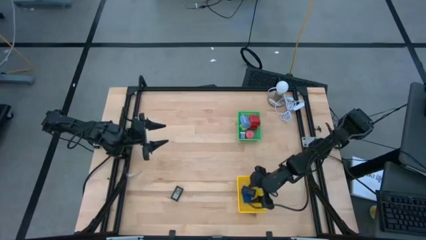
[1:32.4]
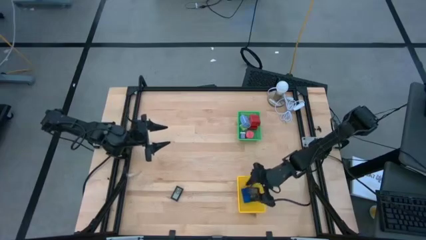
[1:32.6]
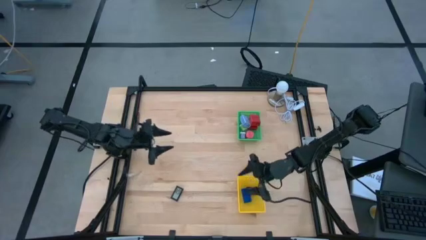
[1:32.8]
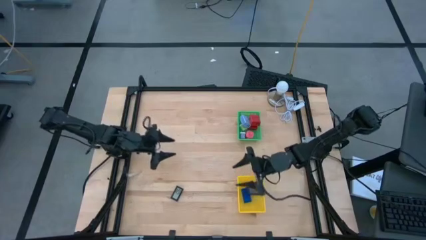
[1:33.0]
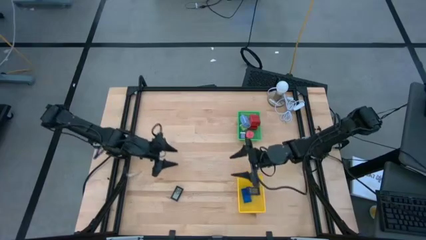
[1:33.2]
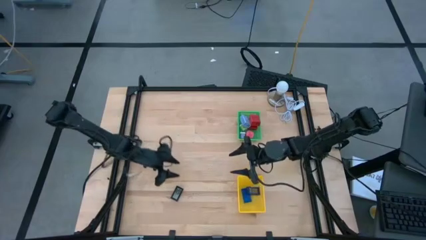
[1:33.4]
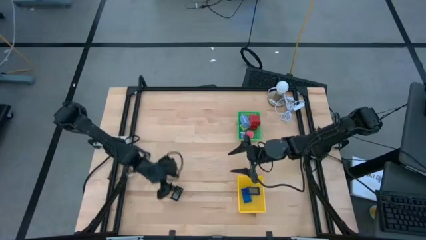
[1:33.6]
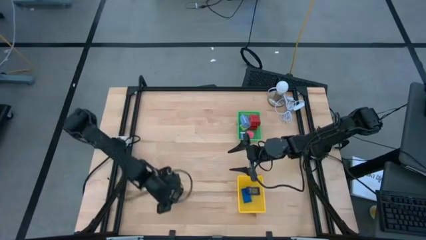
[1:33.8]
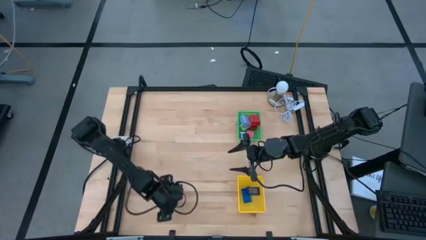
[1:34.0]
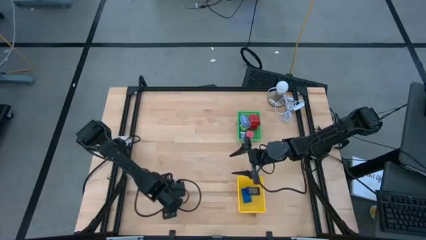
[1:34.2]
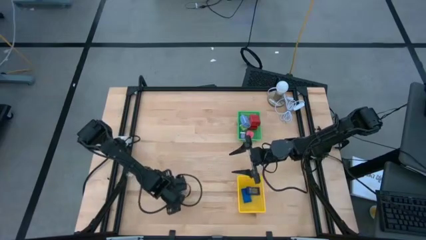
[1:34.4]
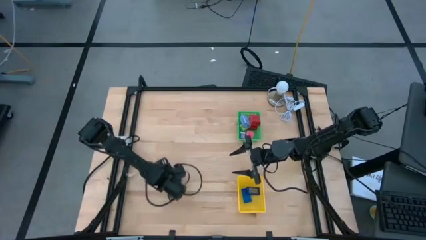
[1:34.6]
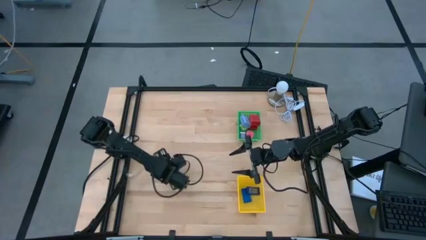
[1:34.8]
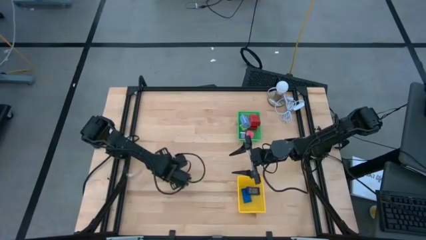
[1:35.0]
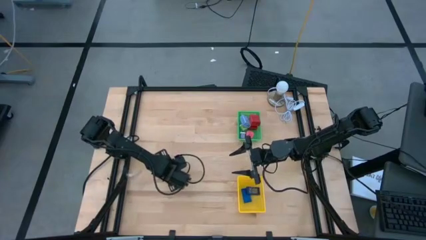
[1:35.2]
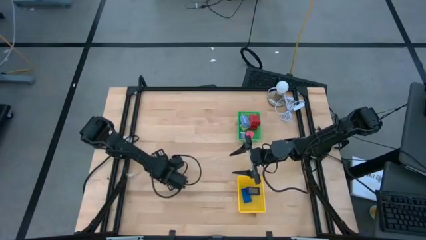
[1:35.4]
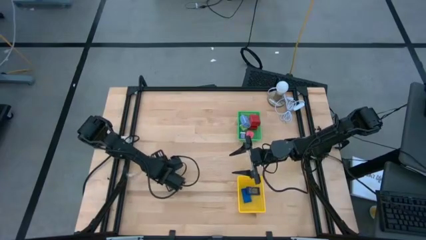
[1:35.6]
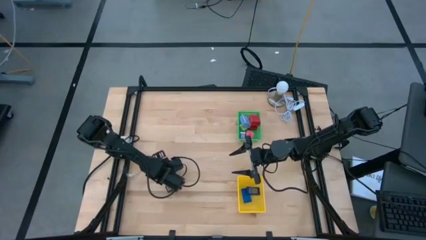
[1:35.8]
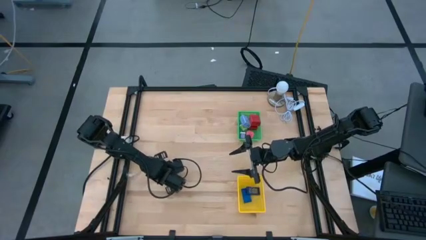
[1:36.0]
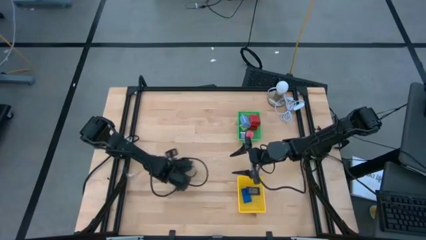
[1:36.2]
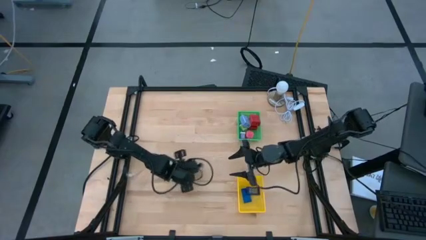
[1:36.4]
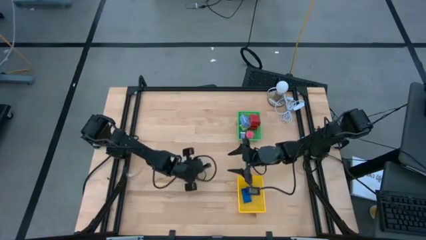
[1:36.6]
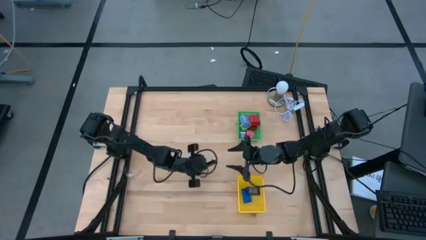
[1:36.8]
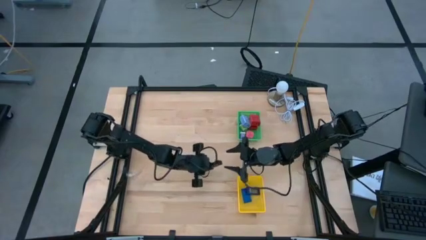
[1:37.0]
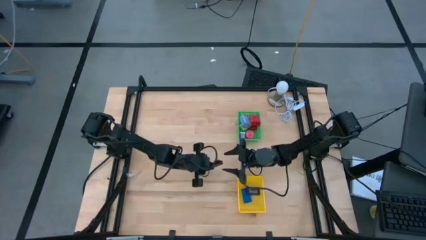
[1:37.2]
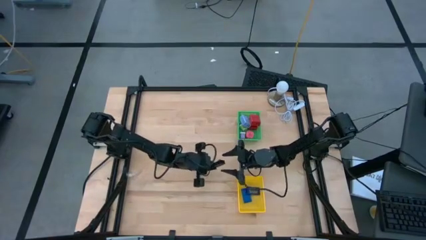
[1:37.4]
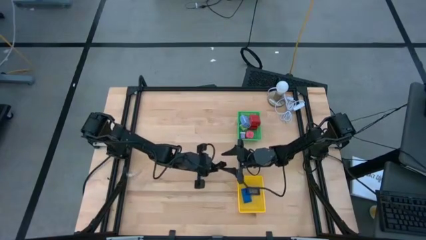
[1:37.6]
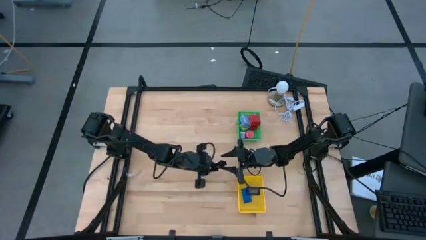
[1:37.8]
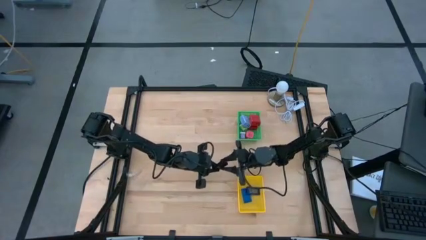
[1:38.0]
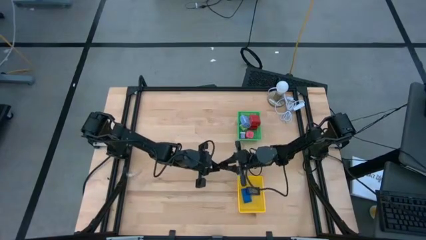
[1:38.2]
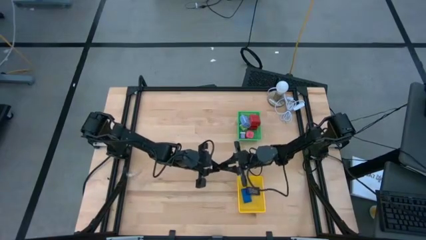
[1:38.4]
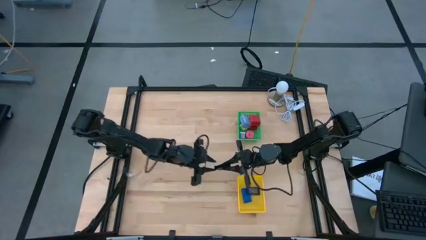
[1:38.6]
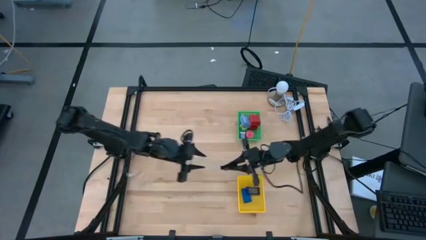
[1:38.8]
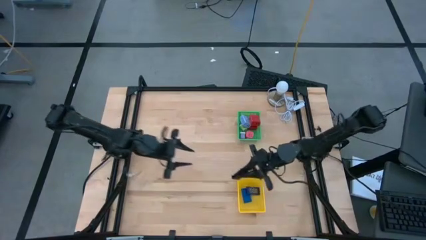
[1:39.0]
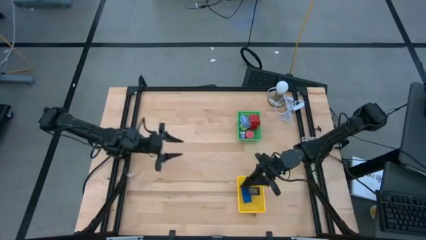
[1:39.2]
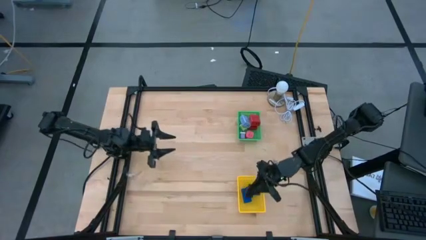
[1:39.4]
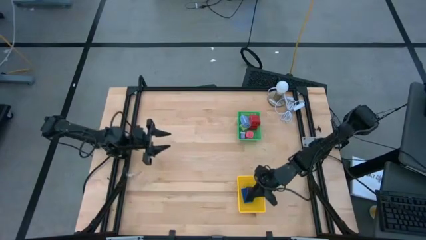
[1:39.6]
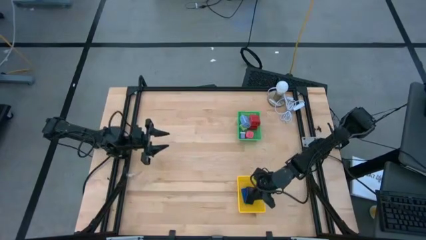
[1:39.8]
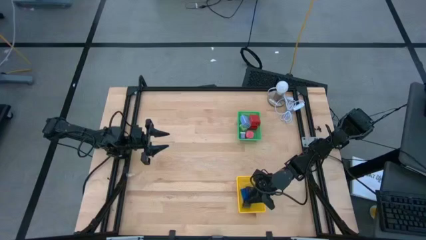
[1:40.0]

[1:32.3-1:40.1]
Task: Pick & Place Office items
Put the black digital timer into the yellow bin

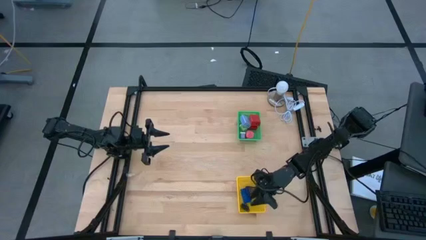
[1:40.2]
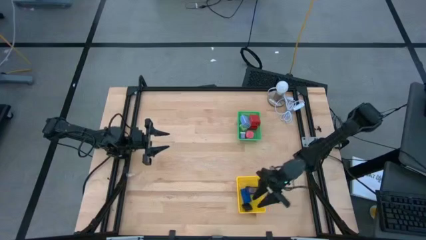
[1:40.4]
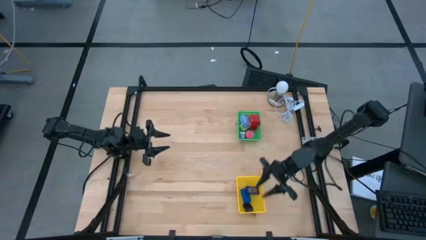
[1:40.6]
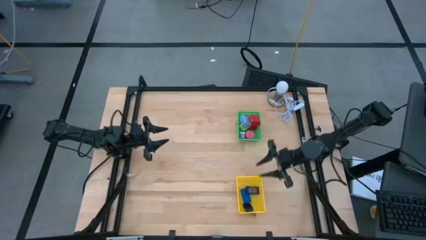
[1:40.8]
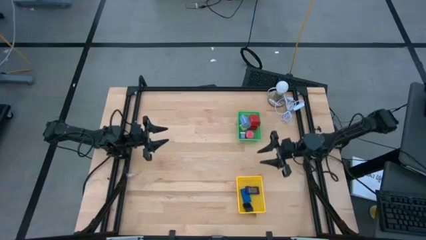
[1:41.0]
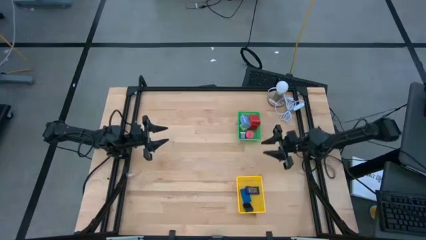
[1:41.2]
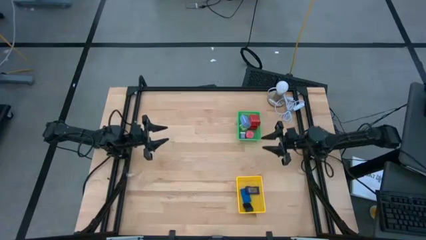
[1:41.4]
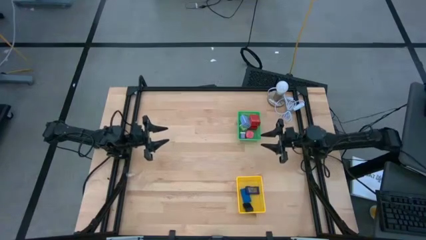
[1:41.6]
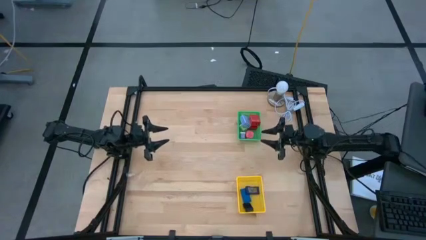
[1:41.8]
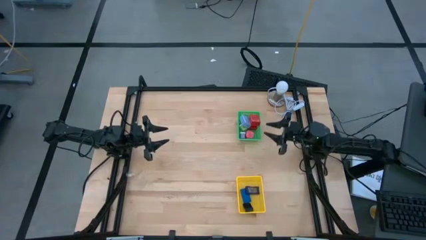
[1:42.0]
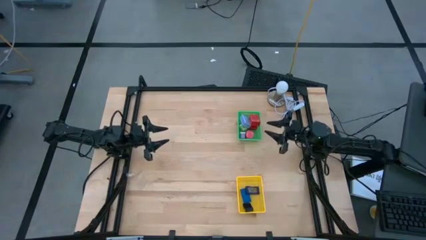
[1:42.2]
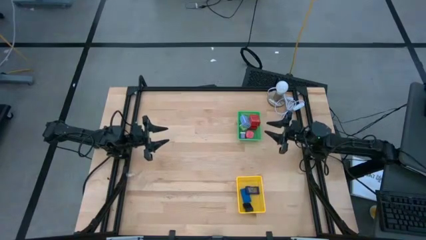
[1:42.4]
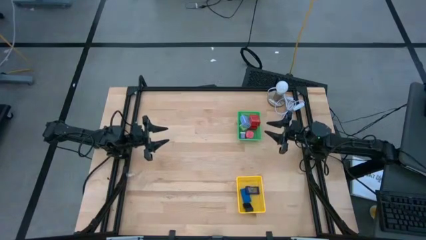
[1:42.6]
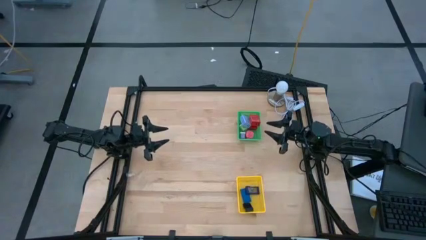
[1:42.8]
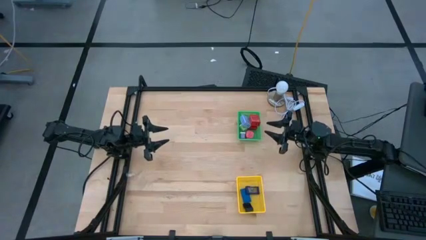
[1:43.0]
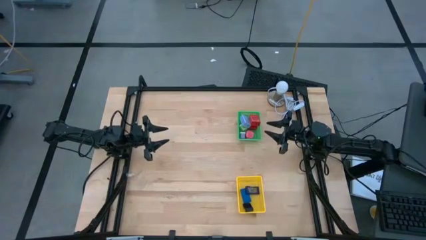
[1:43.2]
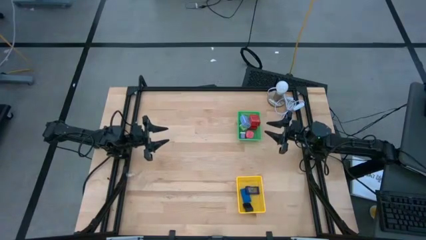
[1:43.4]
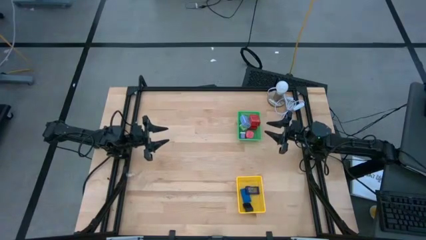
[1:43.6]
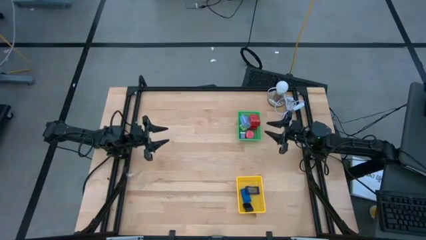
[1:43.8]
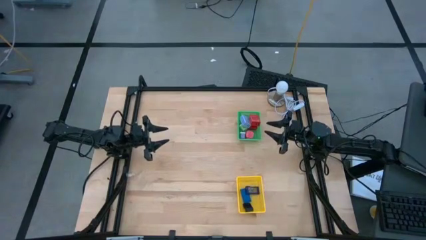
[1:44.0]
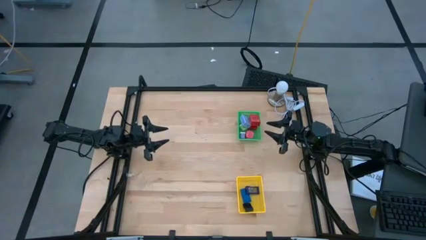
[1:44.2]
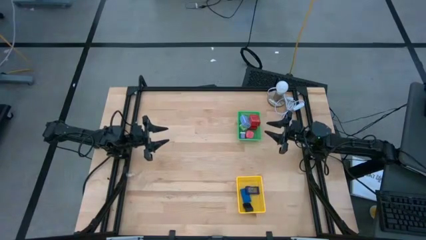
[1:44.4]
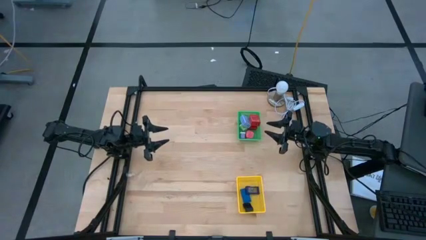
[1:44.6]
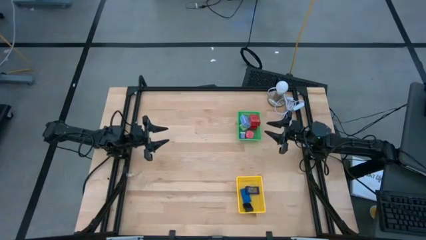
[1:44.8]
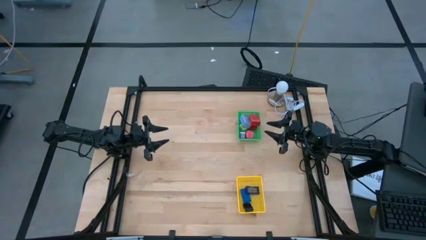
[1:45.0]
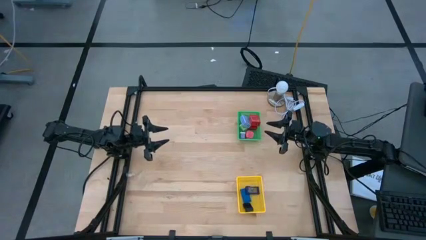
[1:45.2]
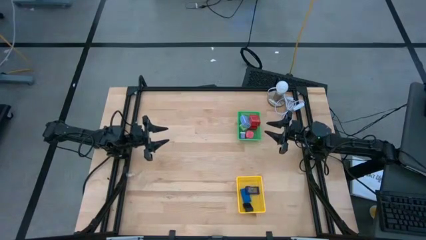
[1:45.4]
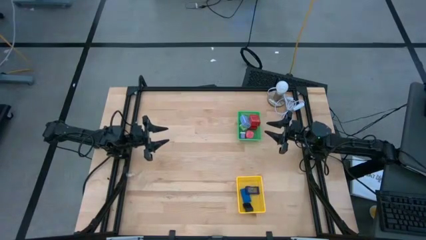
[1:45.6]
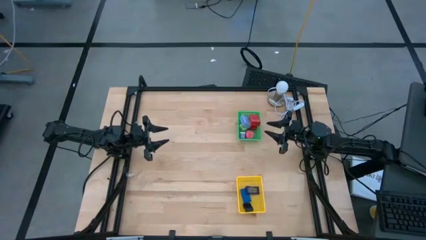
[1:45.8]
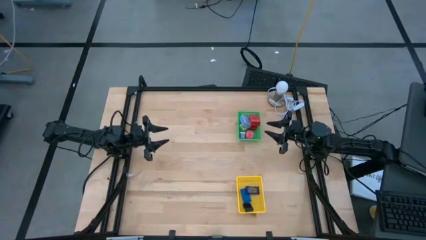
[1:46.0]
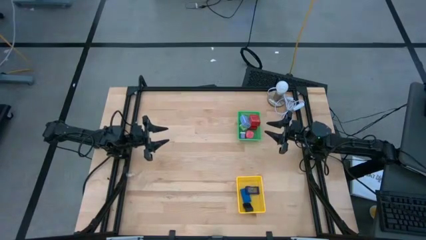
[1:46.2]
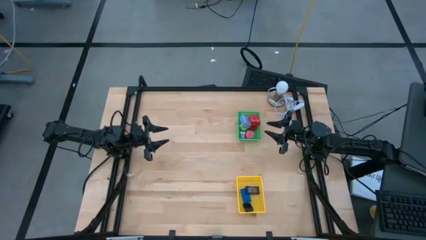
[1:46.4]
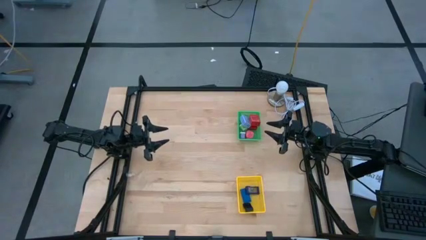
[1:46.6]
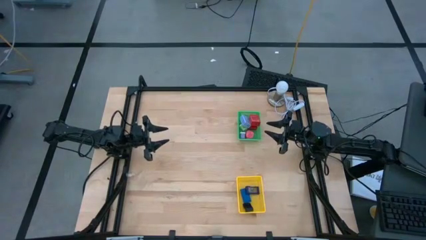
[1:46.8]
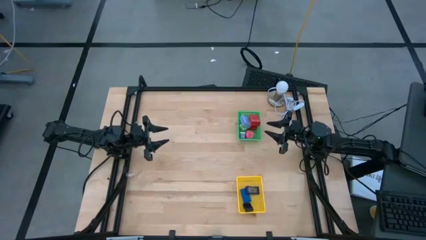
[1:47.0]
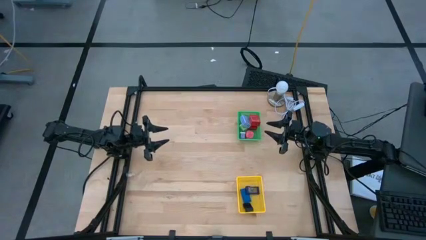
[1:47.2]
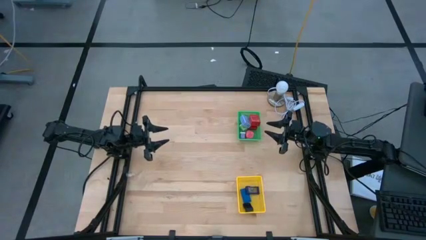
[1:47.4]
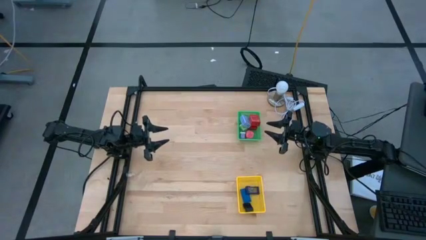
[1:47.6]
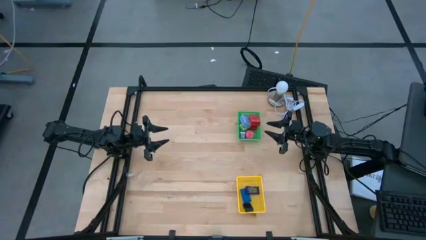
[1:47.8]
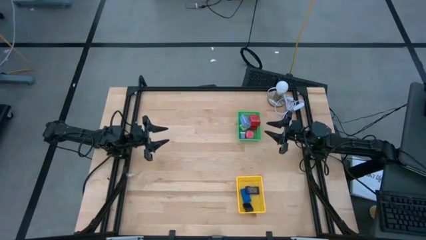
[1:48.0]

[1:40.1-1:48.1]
Return to home position
